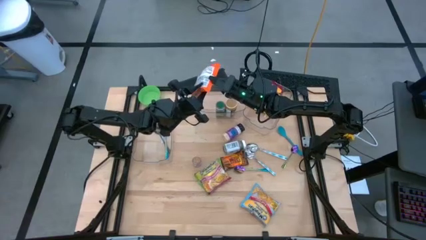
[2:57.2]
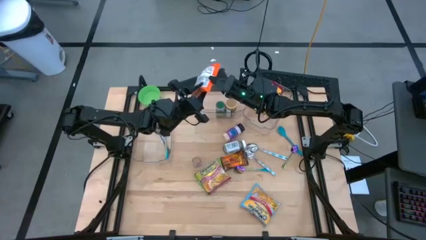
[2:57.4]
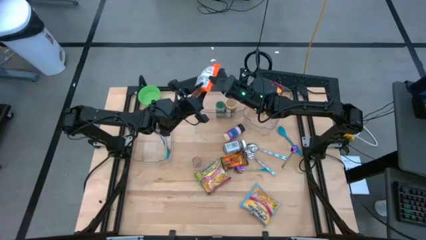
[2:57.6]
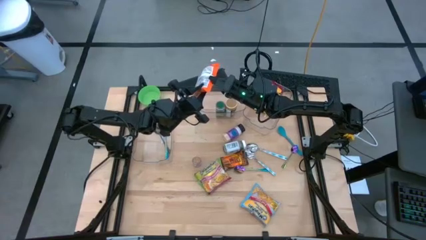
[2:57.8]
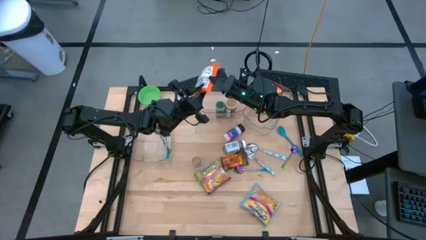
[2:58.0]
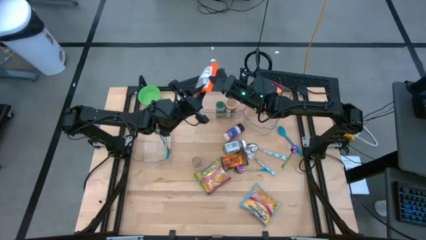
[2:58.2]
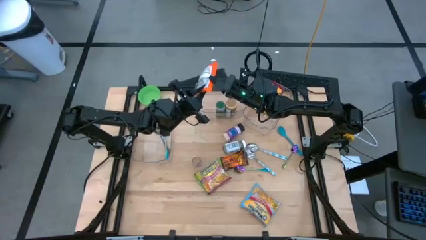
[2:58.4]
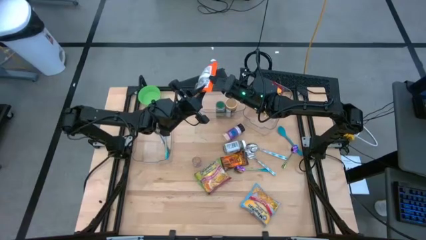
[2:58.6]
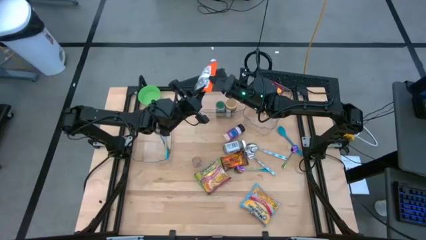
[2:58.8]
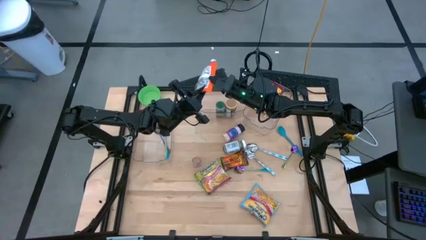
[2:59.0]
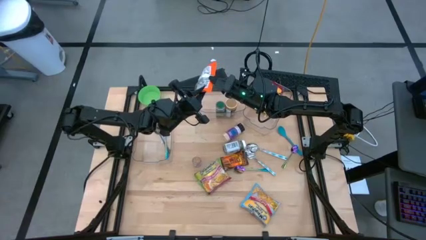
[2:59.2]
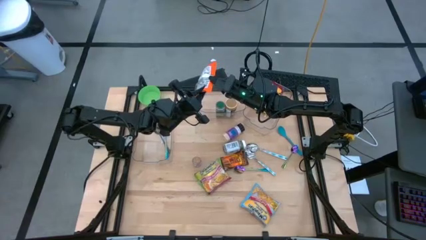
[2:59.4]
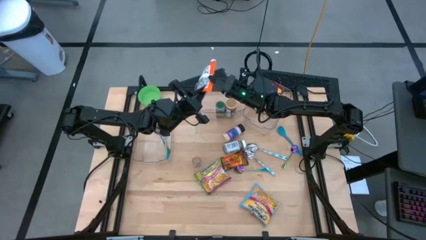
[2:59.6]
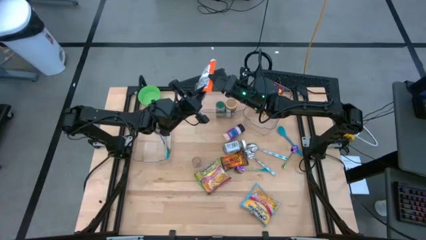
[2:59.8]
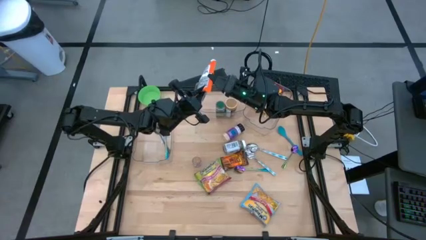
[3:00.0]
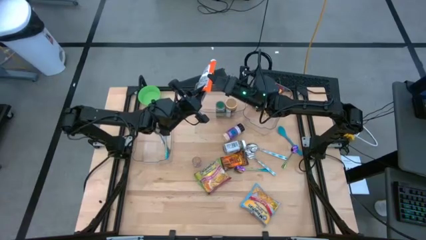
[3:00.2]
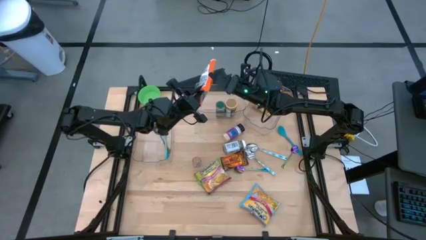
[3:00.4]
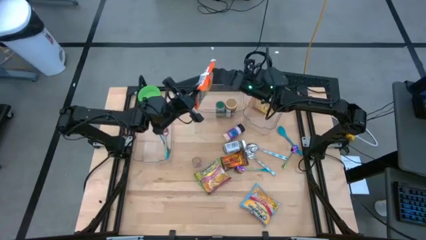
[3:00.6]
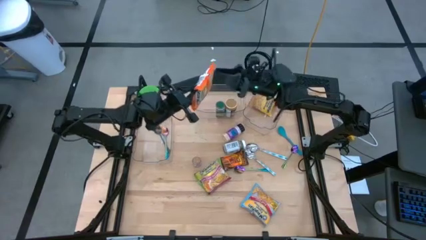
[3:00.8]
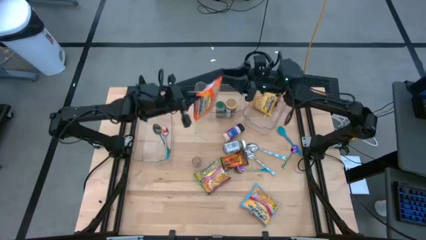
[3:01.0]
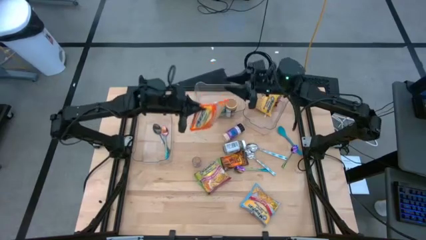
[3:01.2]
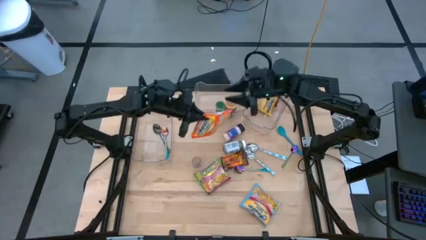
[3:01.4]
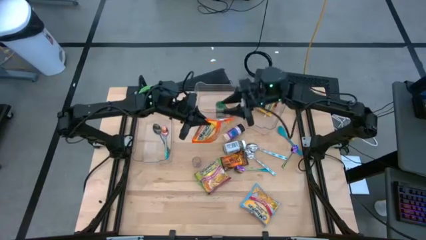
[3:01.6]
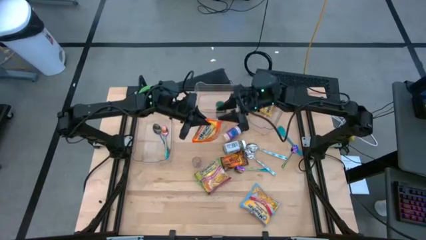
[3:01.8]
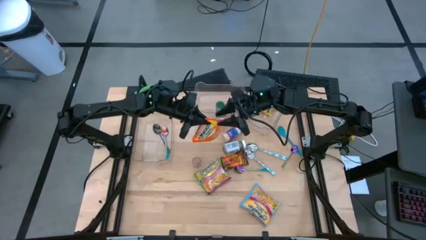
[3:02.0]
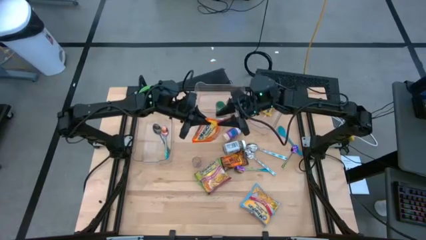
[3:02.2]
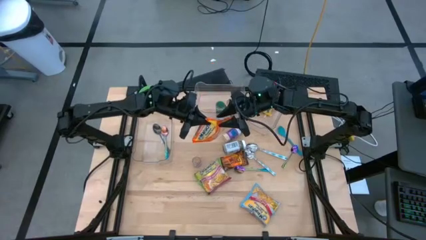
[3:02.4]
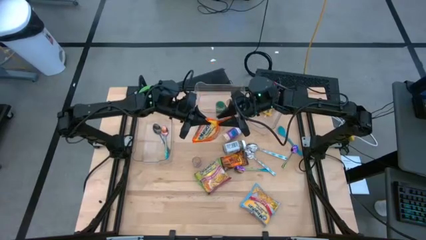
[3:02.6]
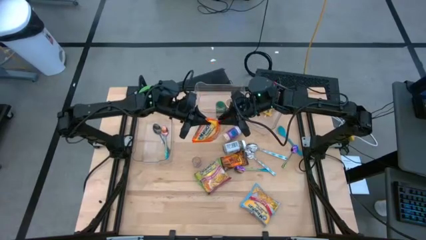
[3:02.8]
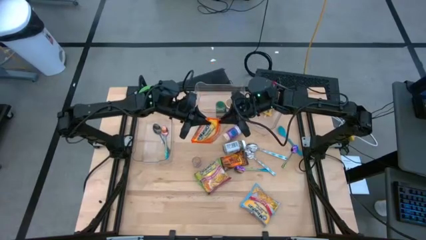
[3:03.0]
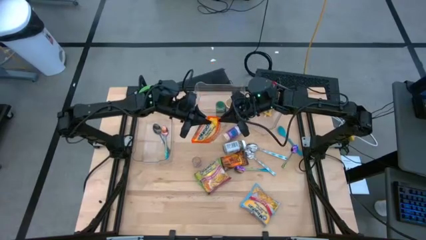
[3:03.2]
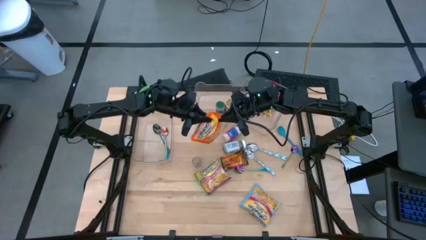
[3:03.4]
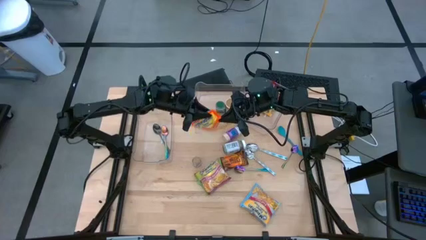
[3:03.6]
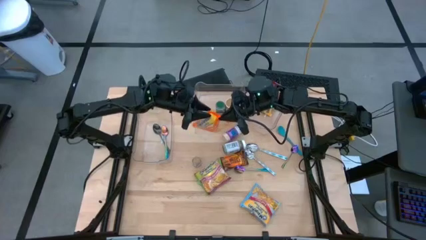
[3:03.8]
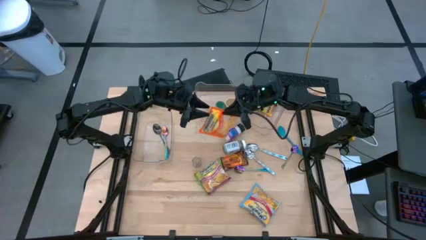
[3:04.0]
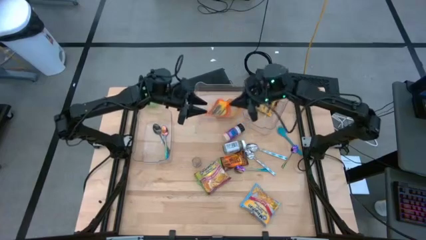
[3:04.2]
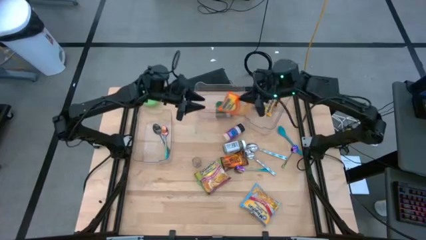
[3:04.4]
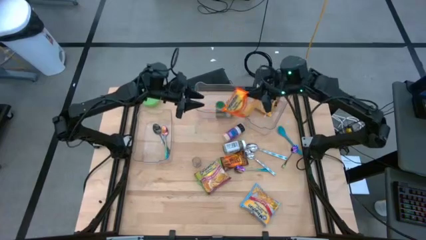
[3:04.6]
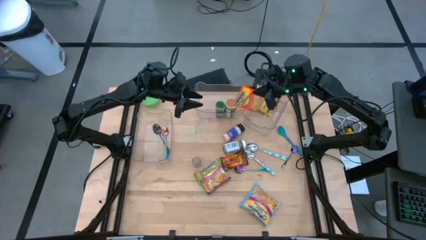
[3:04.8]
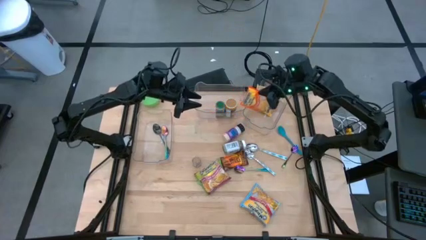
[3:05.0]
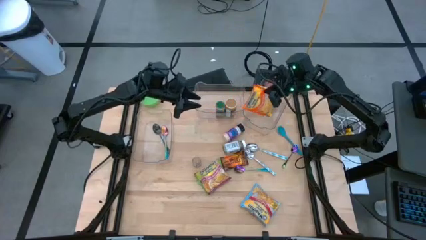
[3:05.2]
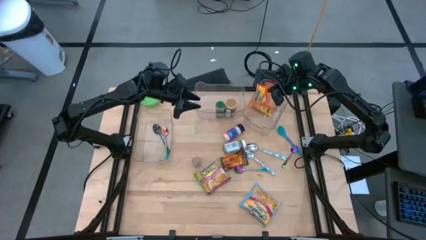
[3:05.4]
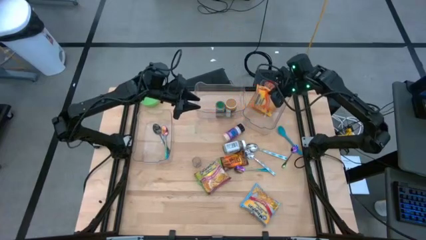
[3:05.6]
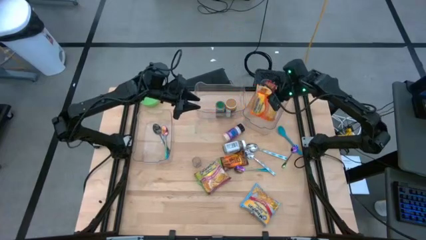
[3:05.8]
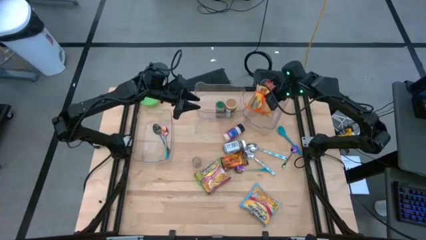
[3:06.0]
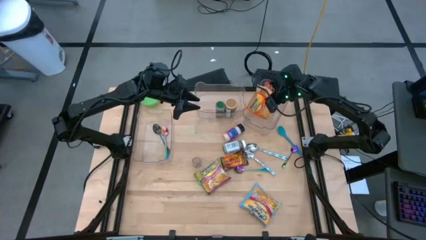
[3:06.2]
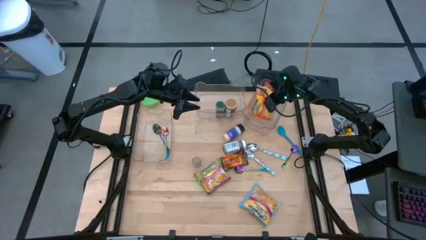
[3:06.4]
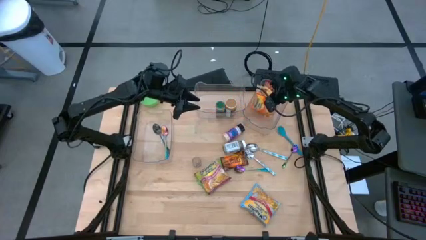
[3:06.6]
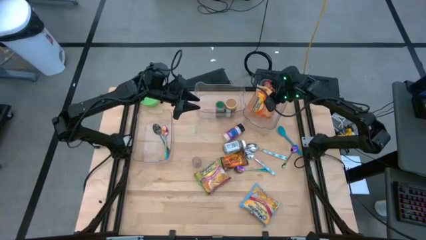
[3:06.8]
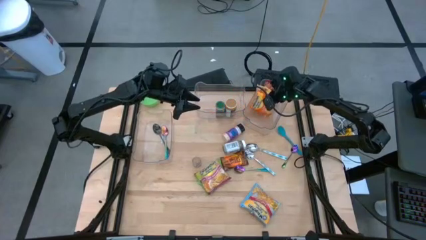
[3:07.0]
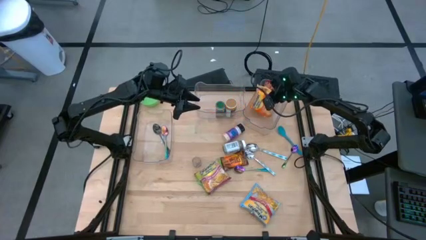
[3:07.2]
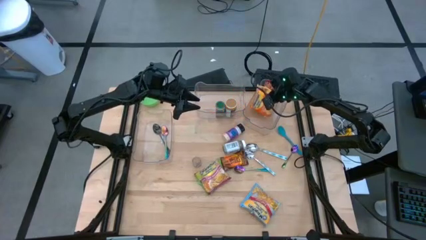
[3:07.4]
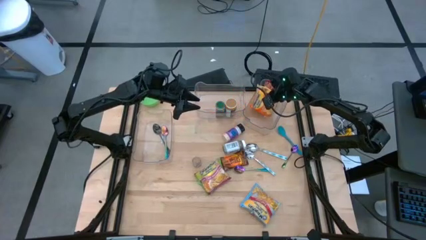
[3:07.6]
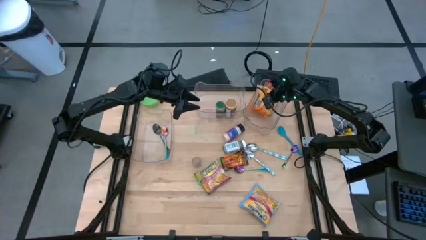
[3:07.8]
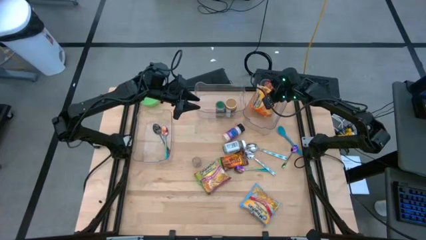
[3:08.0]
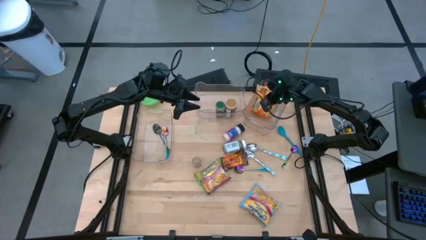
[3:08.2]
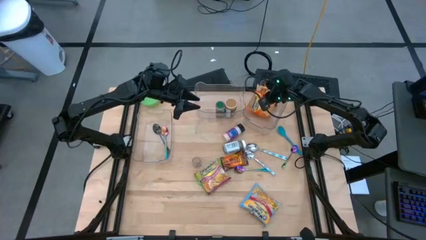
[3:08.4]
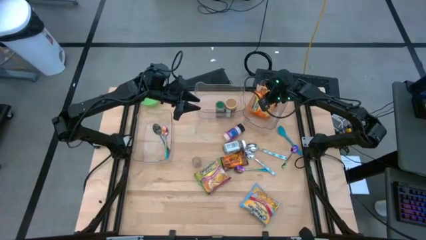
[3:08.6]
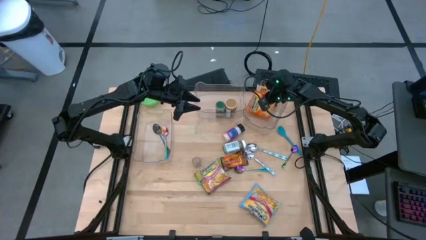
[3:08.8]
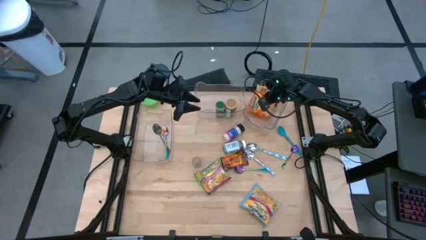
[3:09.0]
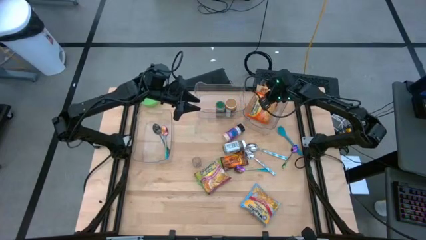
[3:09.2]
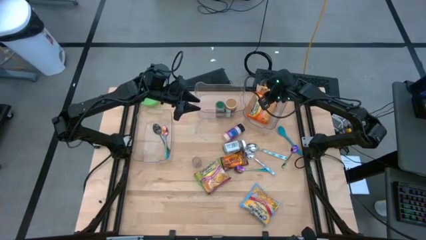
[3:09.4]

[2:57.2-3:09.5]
Task: Pick & Place Food Item
Put the orange noodle pack into the right transparent bin

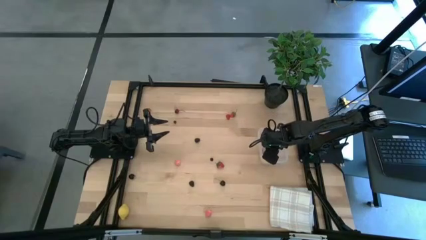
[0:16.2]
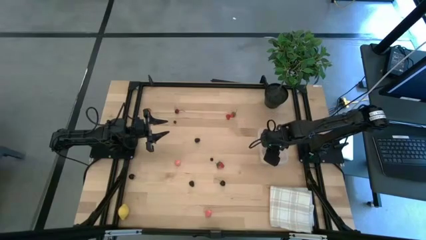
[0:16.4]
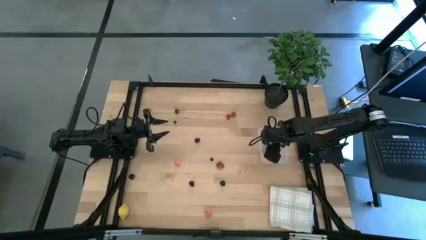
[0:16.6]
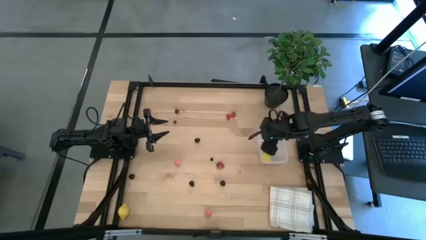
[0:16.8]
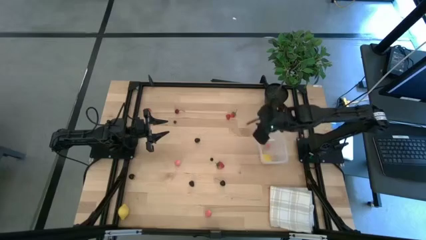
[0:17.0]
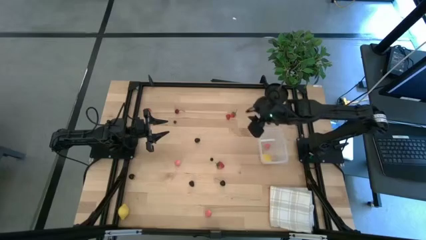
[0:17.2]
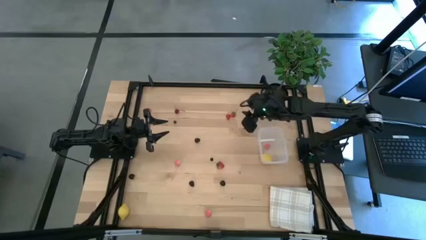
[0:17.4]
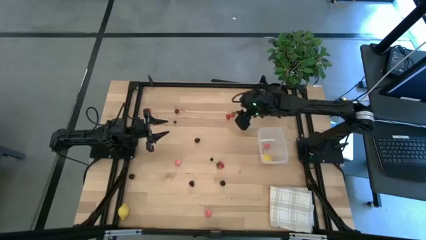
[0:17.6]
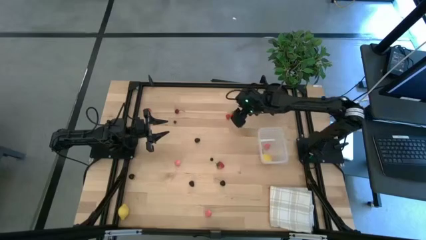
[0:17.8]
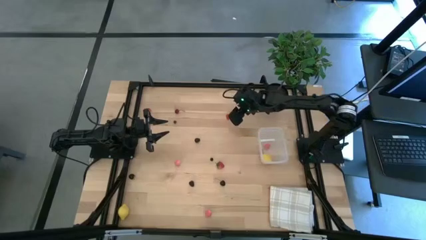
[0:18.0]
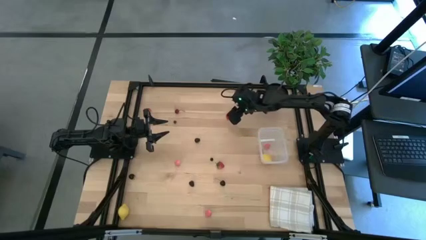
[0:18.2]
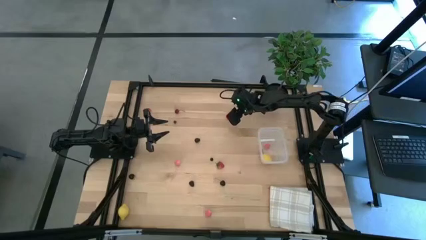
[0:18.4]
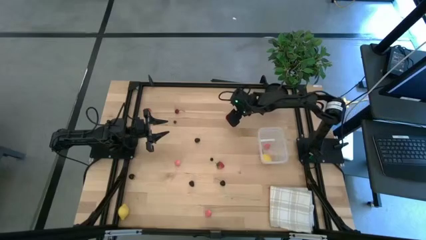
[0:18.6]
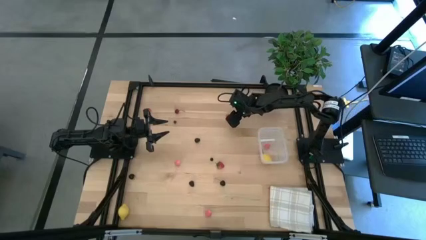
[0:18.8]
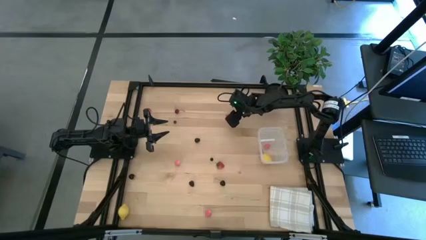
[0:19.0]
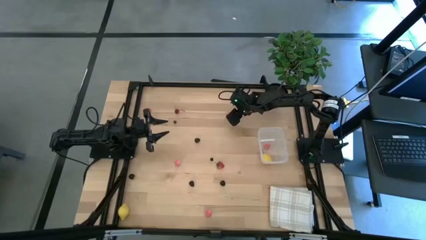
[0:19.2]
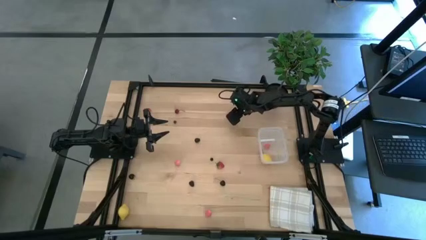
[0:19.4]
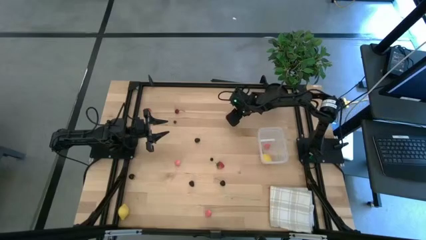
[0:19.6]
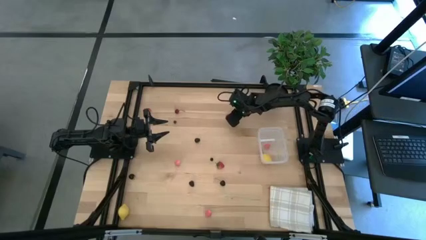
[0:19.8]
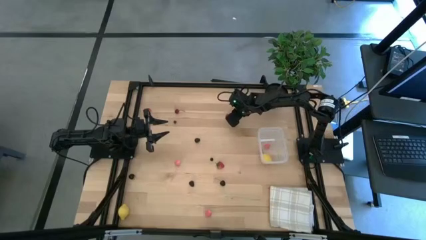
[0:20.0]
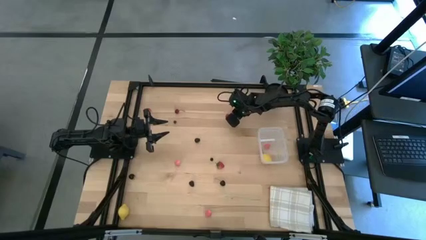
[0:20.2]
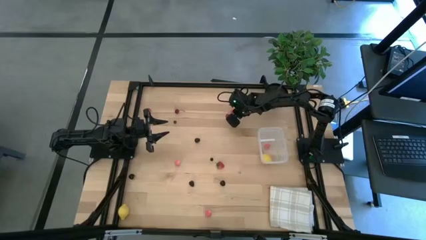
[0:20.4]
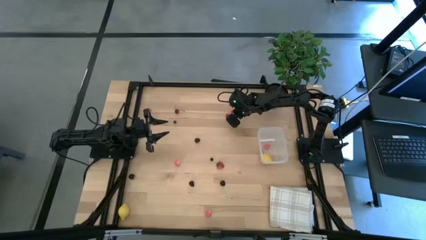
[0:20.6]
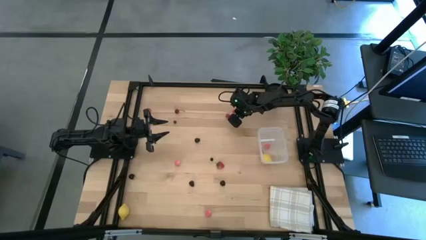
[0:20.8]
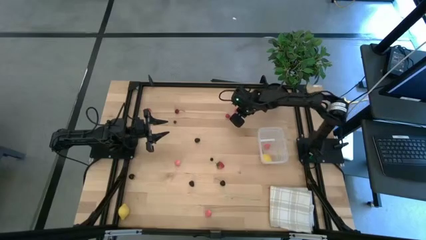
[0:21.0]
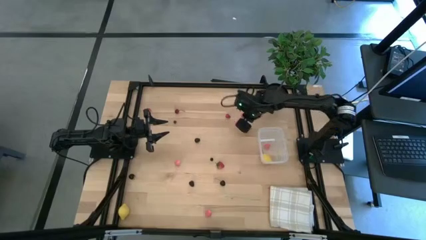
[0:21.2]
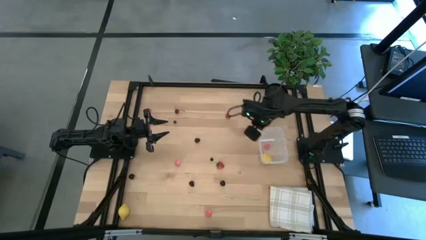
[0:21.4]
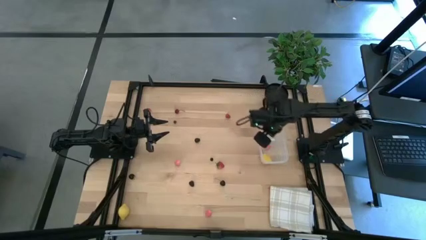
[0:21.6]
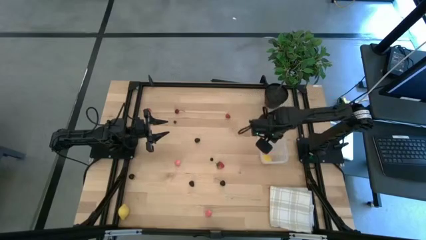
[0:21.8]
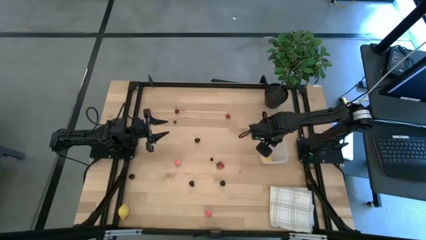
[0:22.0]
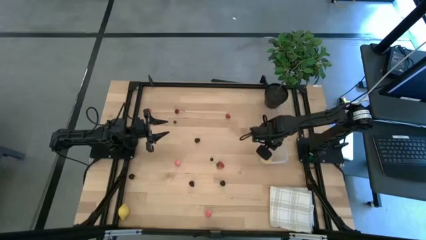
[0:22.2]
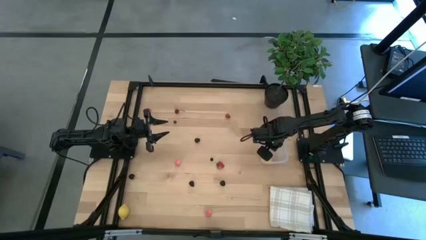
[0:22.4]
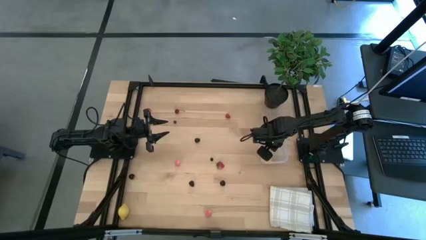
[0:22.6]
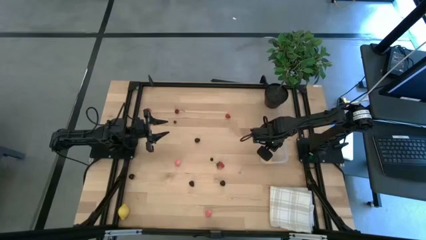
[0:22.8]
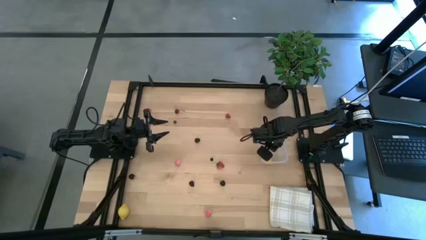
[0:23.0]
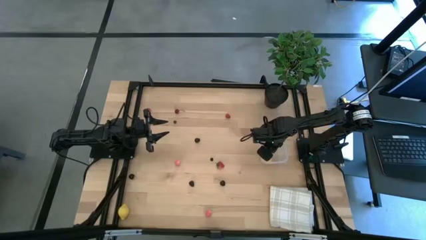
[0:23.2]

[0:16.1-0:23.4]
Task: Pick and placing Produce into tupperware
Put the top right strawberry into the transparent bin
